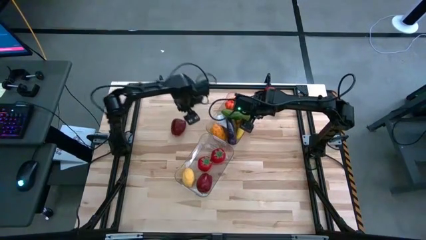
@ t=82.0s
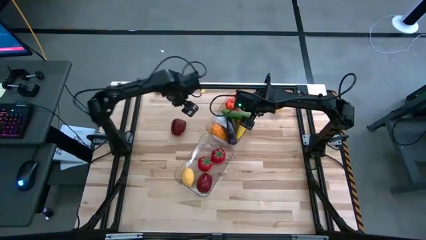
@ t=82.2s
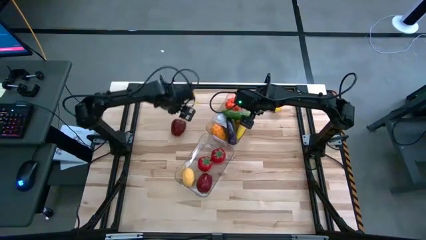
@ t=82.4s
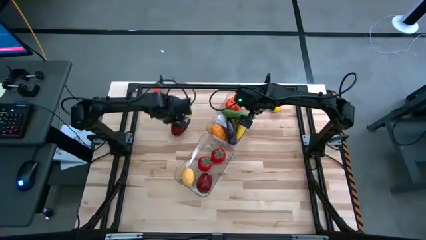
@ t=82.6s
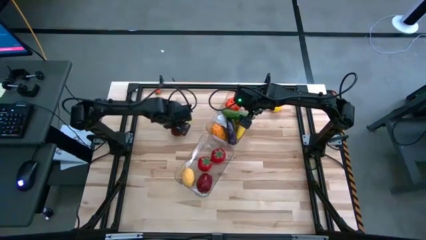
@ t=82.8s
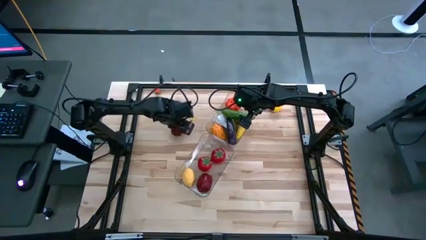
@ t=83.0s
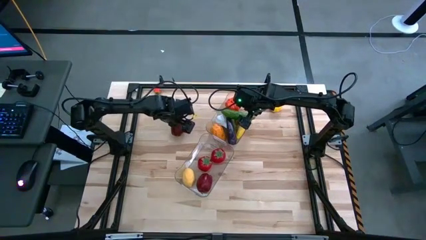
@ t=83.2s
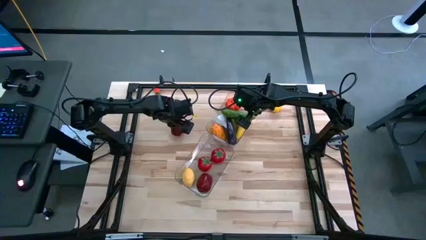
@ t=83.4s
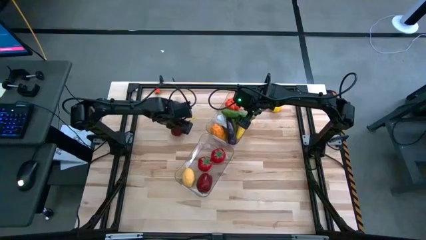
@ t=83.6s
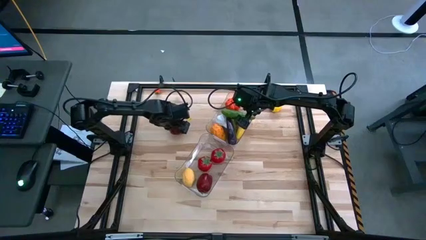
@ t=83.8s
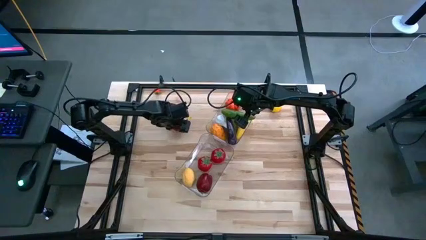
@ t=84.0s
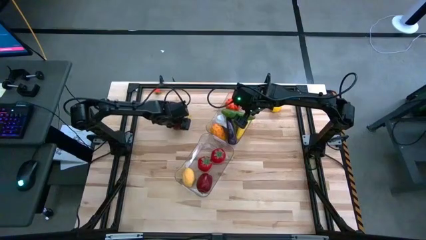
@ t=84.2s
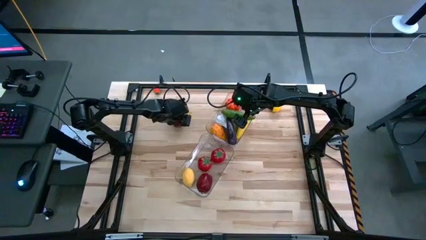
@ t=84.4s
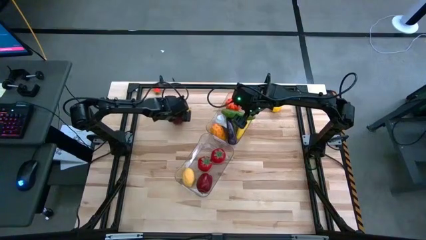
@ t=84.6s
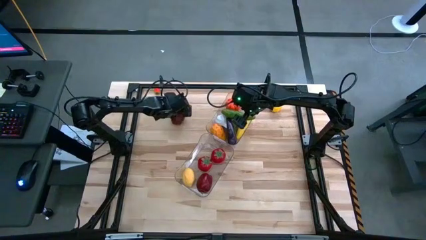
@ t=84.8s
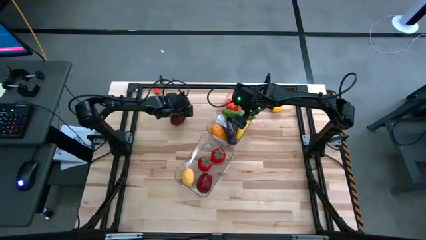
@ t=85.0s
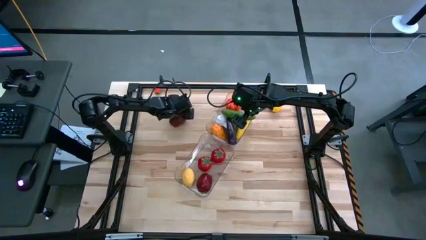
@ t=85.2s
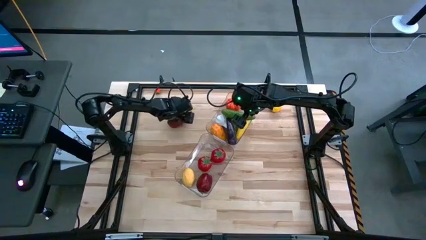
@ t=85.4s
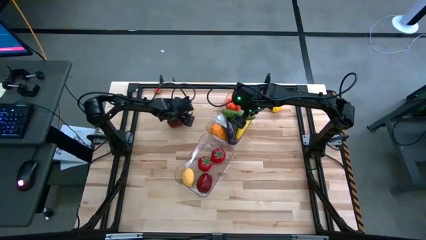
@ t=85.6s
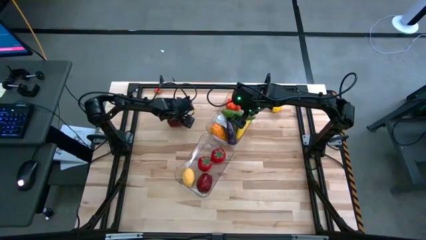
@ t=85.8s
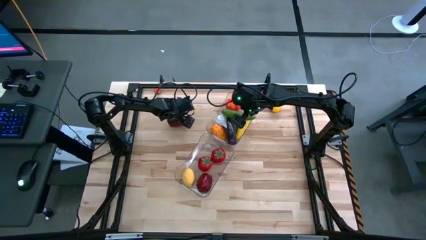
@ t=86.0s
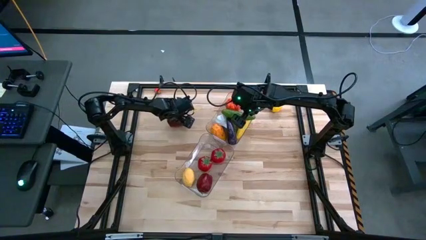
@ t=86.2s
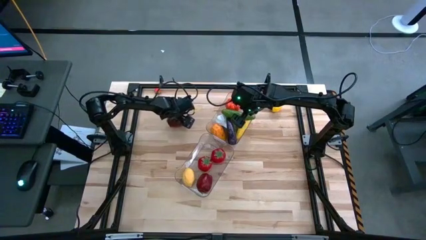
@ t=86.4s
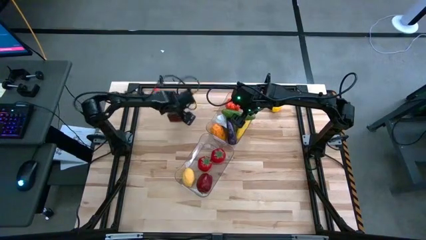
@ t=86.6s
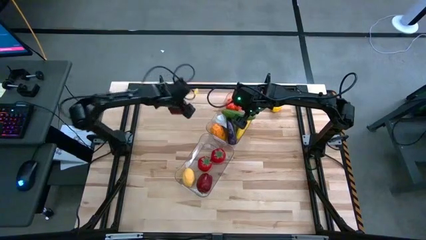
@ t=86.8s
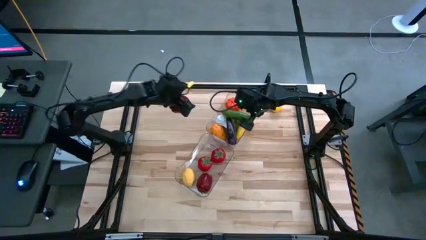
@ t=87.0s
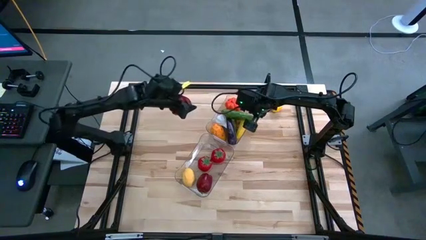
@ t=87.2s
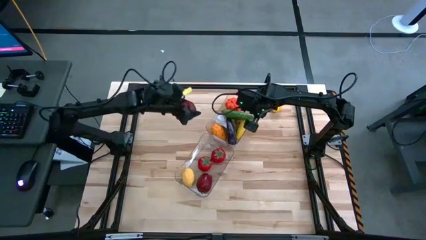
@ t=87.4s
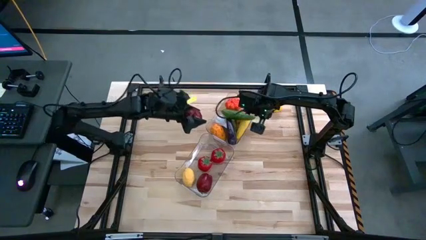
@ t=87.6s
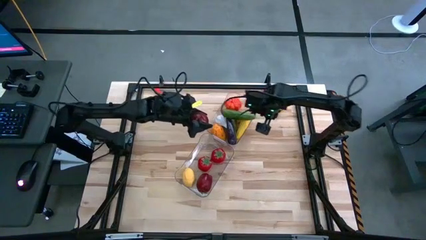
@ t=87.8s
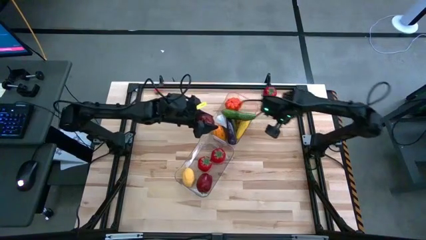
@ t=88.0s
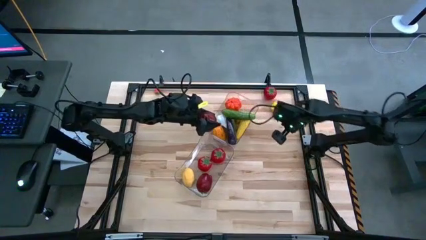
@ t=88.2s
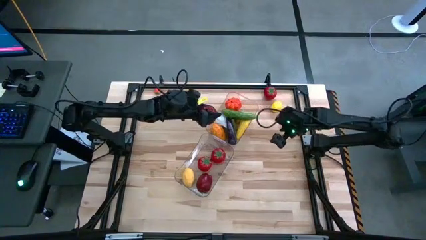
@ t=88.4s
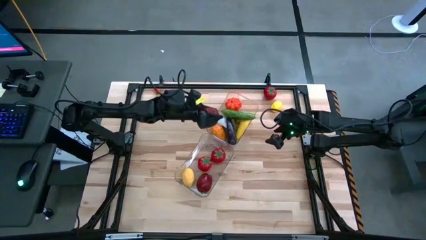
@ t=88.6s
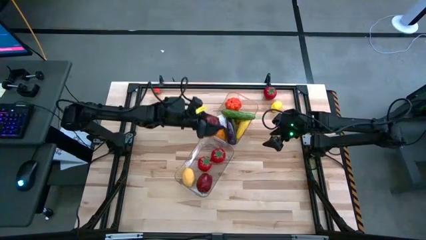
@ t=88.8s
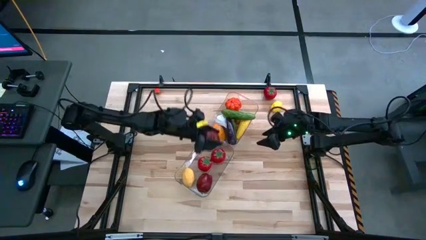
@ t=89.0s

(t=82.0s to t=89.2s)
Task: Sort produce into baskets
Put the red apple into the bottom transparent bin

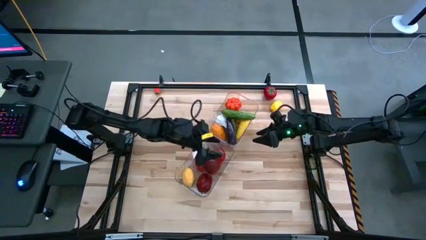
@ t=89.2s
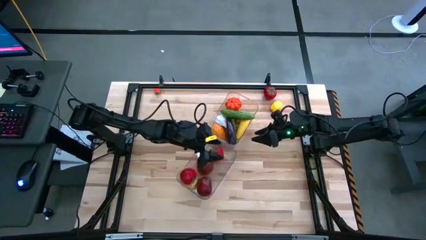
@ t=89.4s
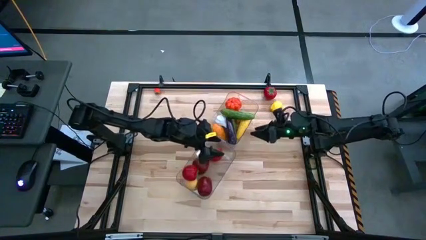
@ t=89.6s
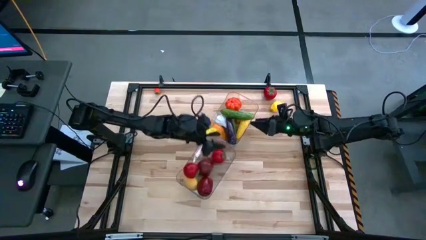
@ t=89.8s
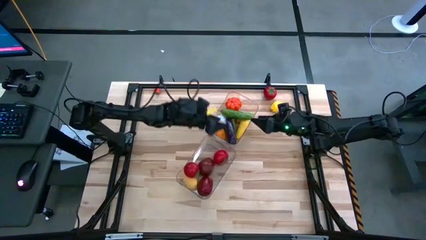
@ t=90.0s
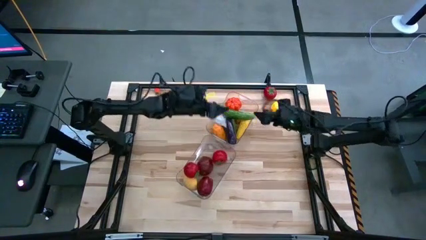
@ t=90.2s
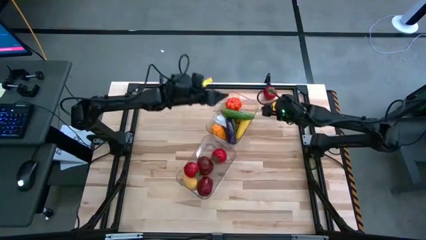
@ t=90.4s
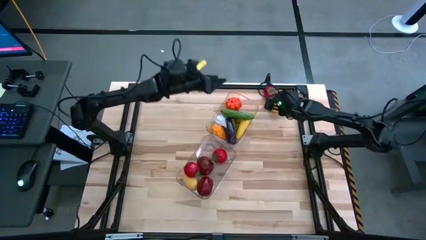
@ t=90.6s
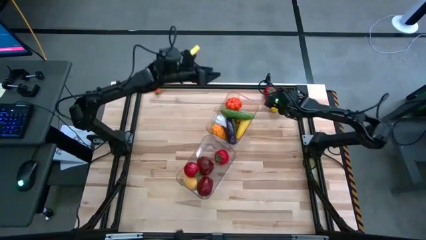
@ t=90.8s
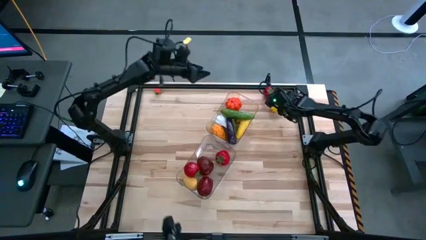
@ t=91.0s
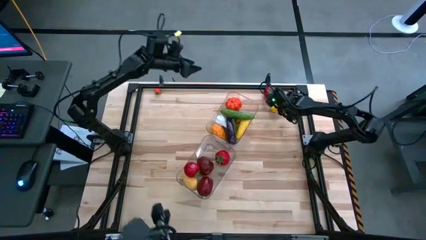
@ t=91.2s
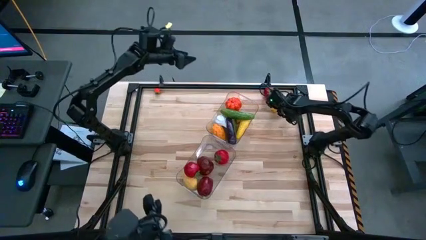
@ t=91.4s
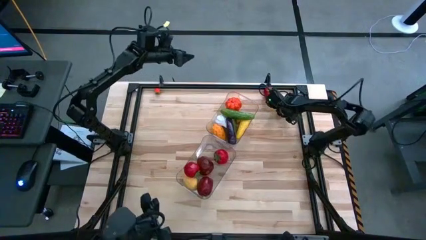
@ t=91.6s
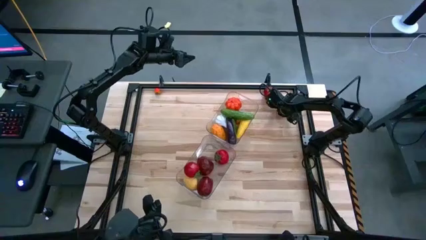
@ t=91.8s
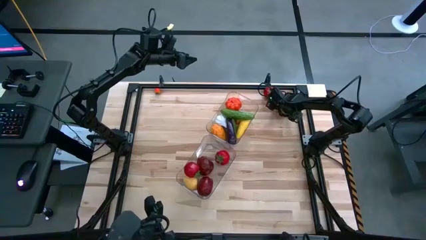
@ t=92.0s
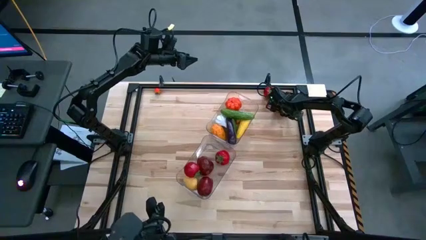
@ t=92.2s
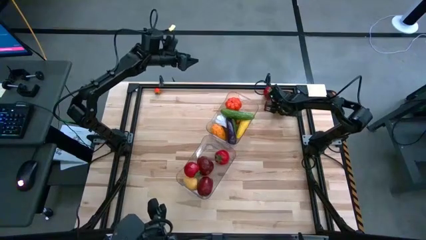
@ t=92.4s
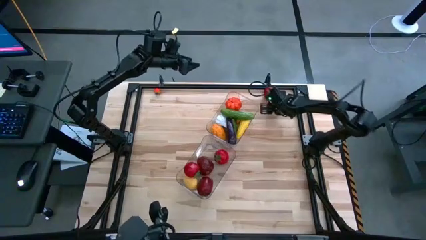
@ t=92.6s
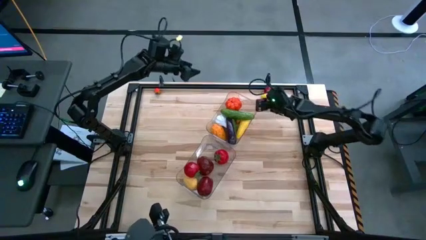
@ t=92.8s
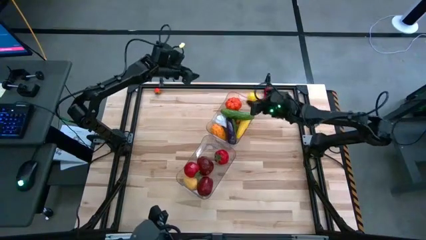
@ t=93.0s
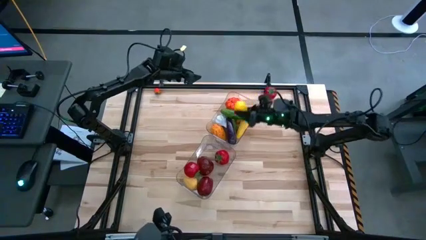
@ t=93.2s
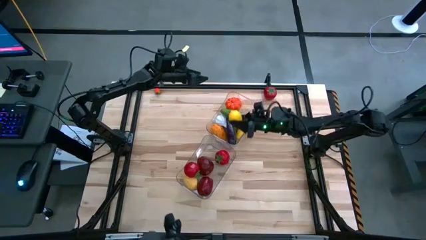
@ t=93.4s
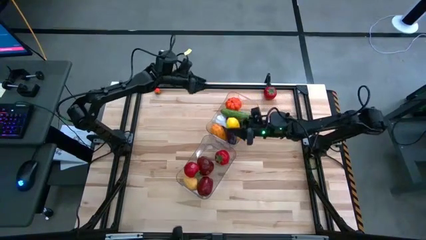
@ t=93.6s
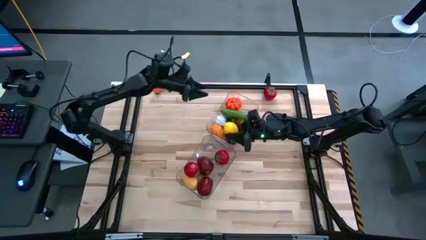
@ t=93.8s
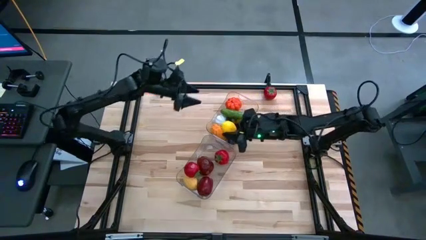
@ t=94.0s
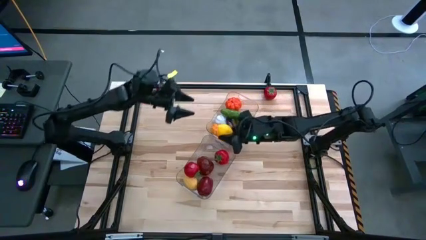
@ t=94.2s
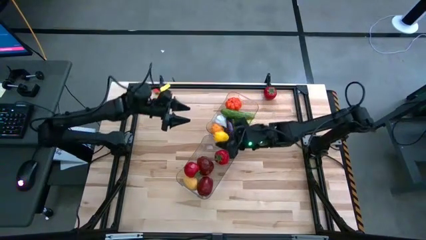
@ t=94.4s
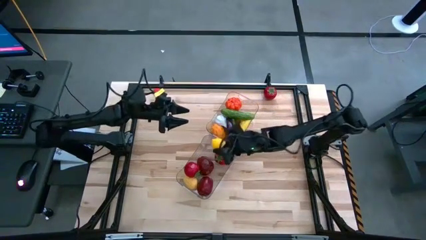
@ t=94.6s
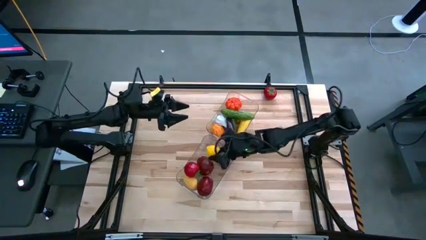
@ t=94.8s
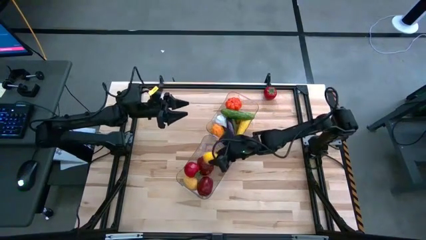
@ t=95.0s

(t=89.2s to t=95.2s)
Put the yellow lime into the bottom transparent bin
